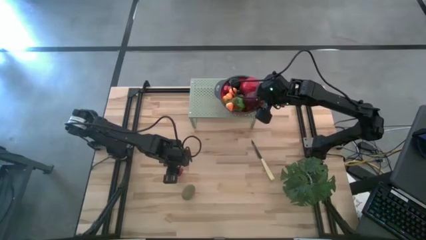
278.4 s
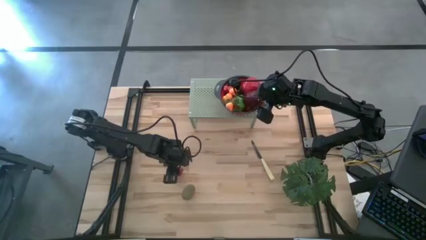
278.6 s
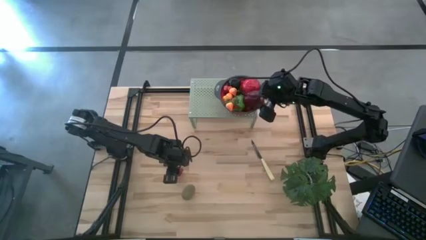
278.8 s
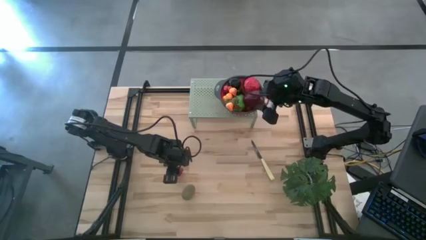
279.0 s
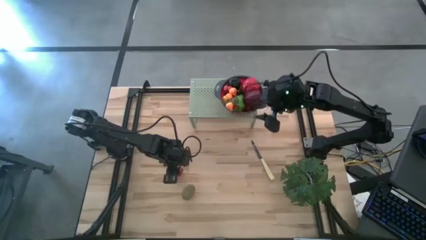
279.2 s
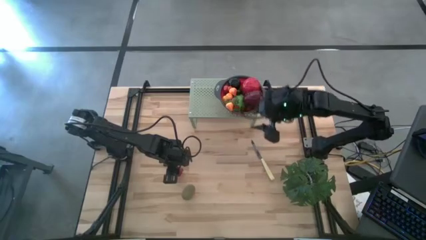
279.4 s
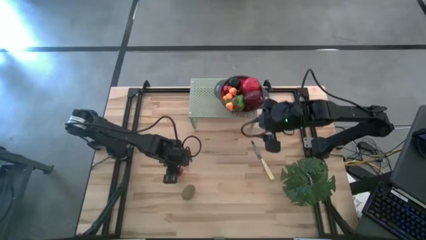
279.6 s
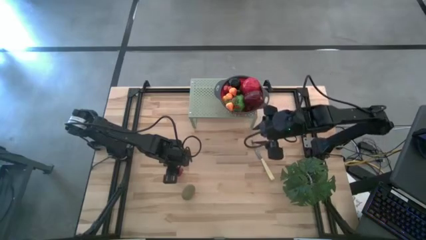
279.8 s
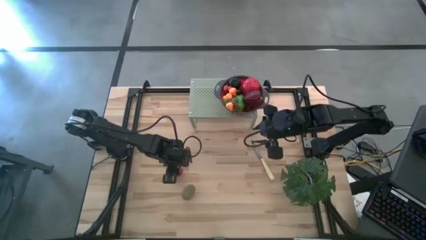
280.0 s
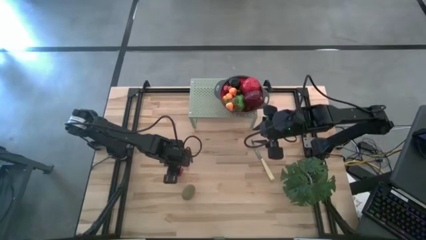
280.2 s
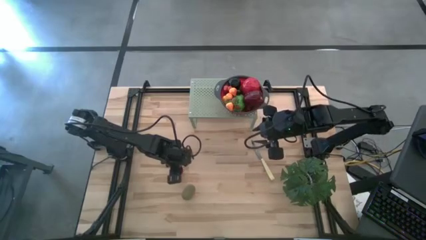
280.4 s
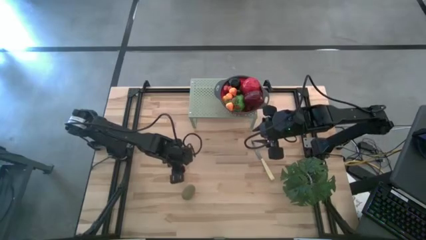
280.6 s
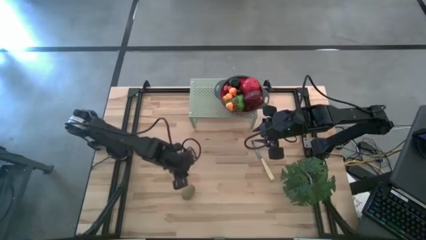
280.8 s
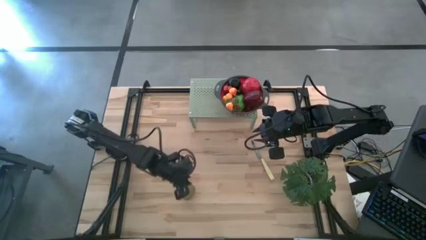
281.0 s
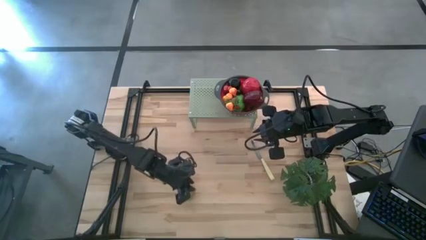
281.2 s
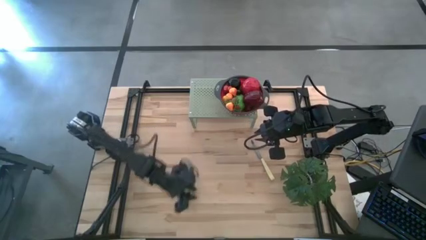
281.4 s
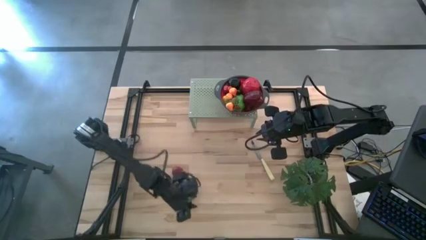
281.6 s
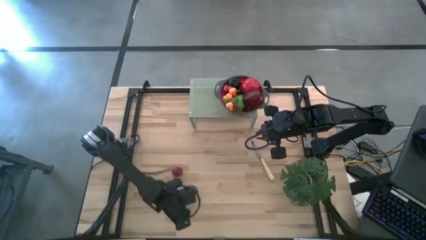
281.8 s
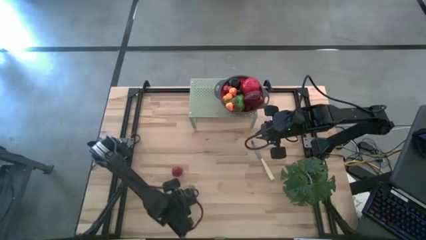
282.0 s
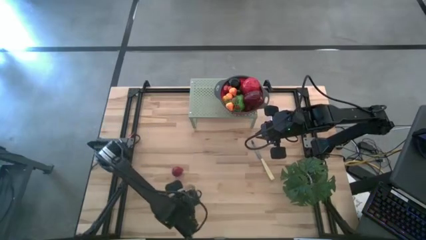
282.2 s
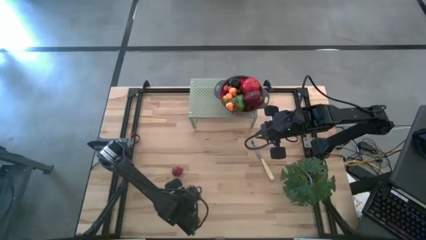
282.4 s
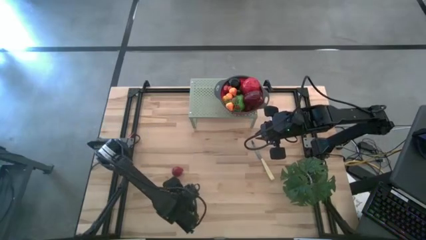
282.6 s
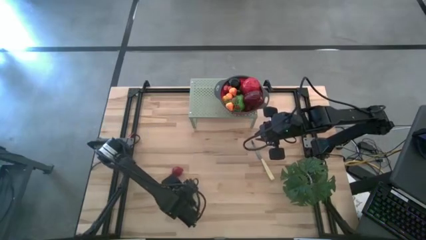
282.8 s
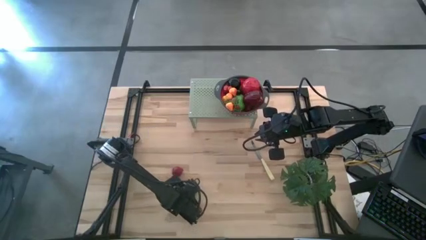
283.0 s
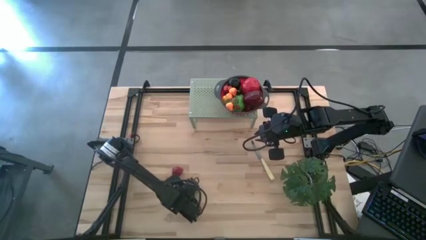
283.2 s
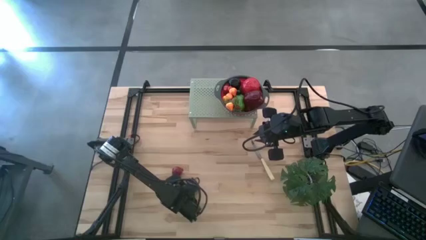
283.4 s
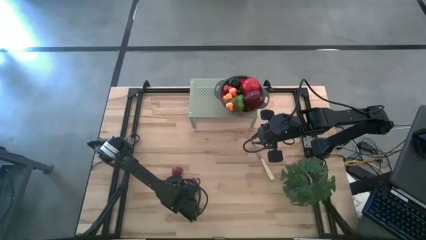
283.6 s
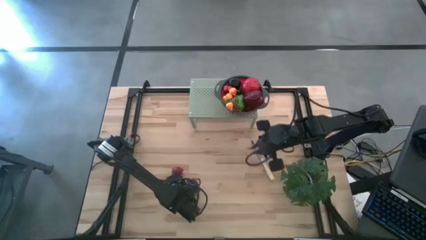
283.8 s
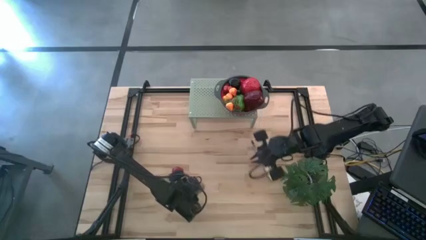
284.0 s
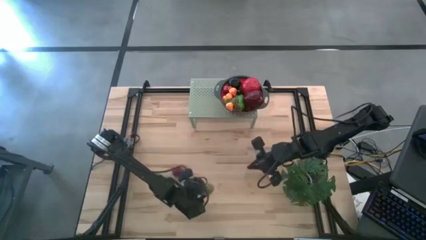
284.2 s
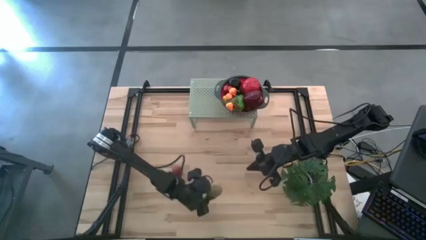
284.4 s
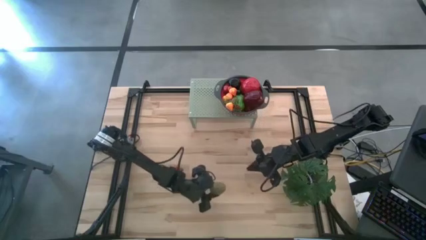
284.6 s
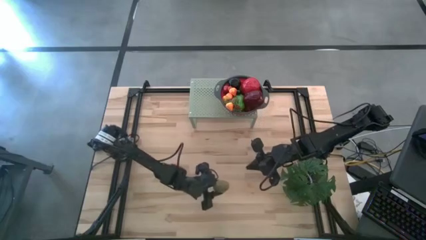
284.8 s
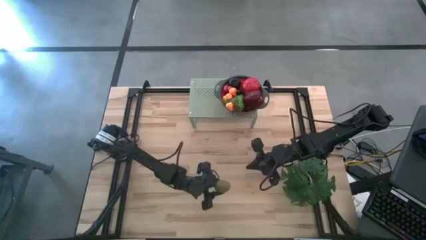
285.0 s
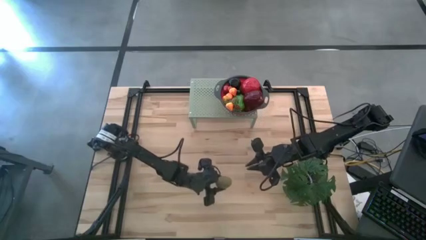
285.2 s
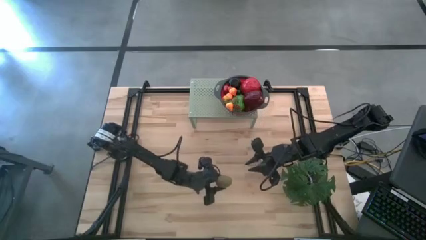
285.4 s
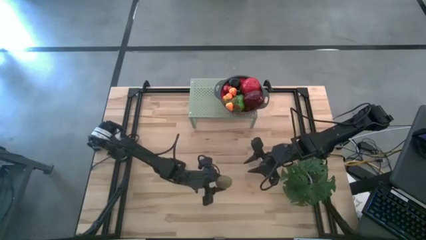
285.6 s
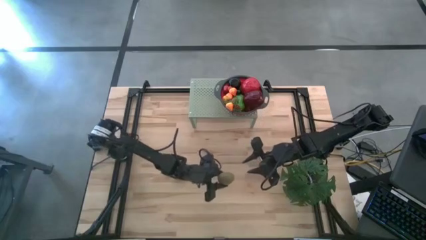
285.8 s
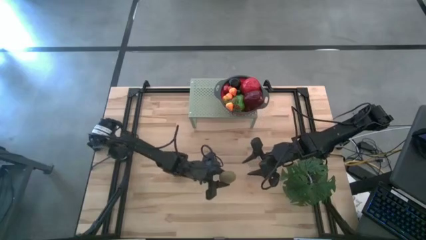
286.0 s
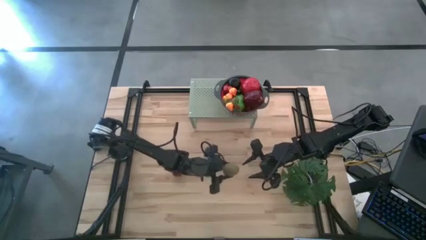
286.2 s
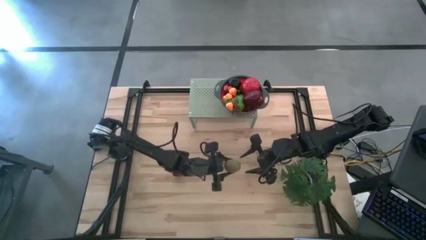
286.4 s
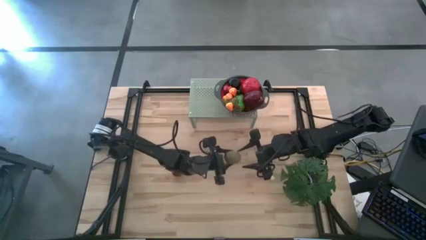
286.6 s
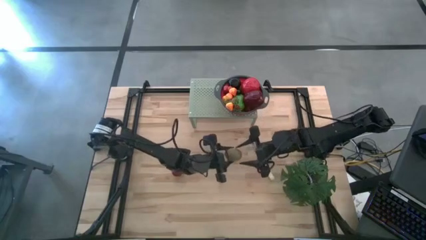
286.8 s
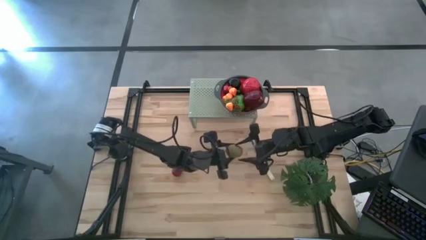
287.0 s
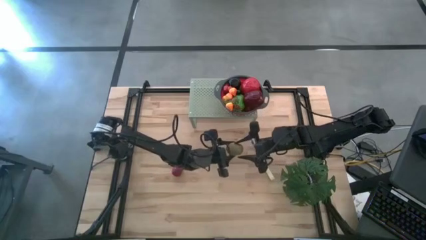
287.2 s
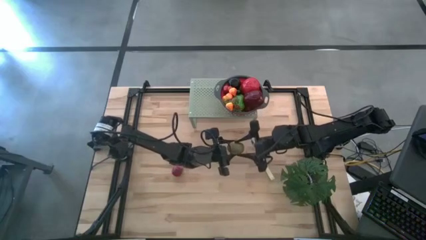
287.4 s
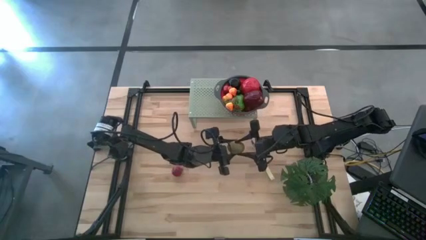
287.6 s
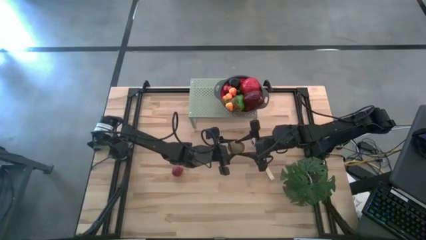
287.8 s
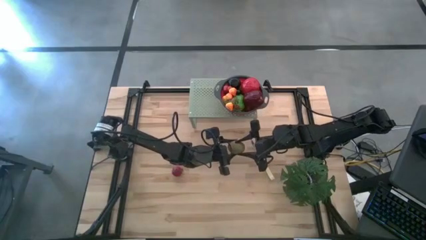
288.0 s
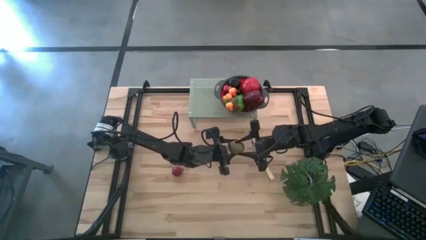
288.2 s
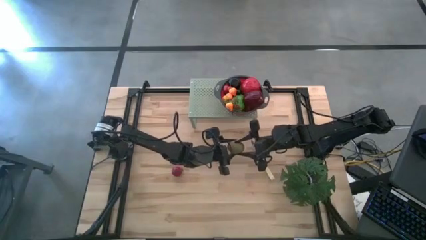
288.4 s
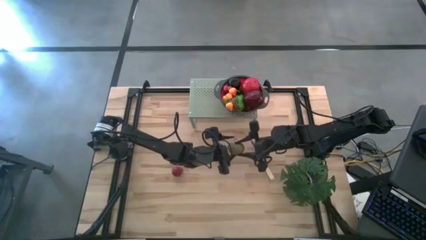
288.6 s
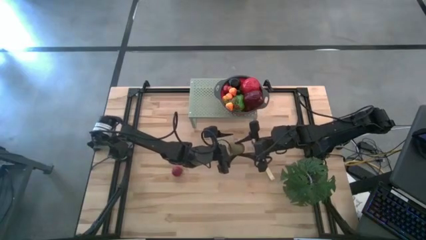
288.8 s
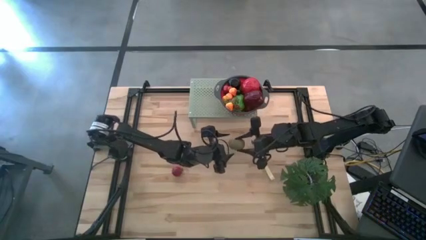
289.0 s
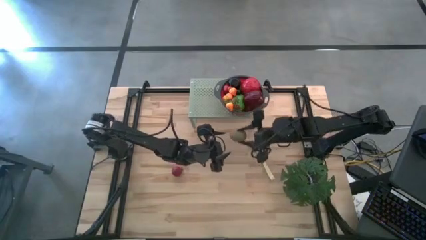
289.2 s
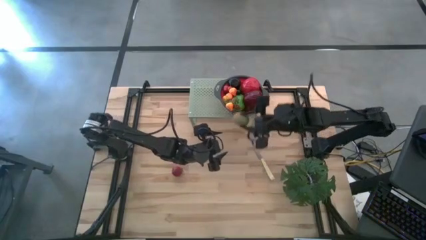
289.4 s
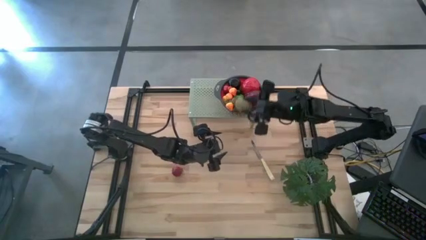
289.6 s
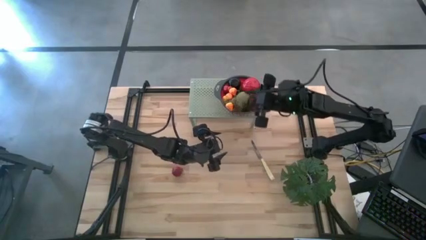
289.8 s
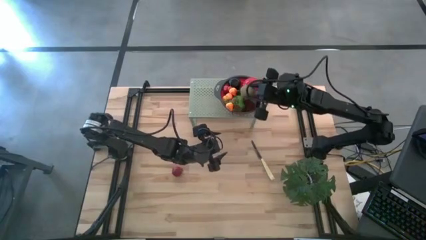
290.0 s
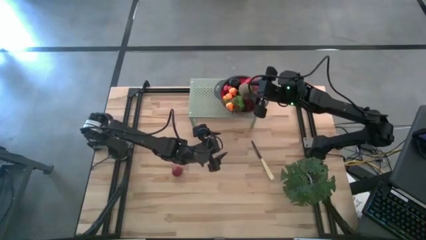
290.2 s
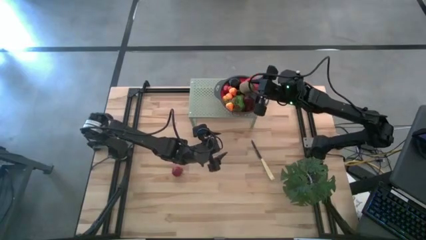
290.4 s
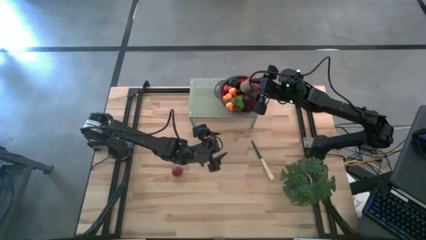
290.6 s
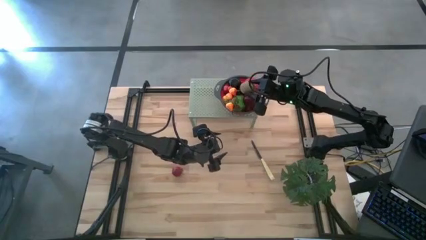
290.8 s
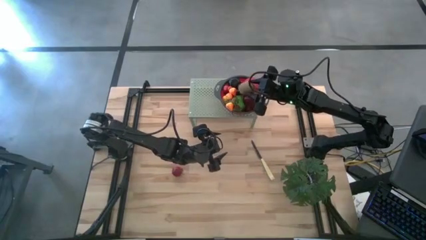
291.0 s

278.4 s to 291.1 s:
Task: Pick & Place Fruit
Put the brown kiwi into the black strainer bowl on the shelf
